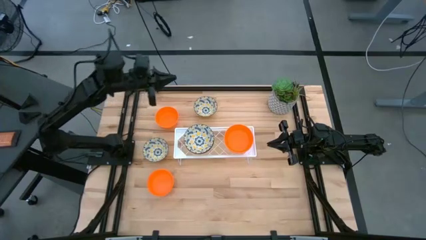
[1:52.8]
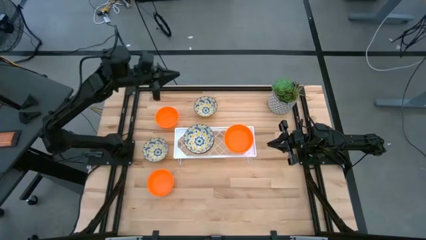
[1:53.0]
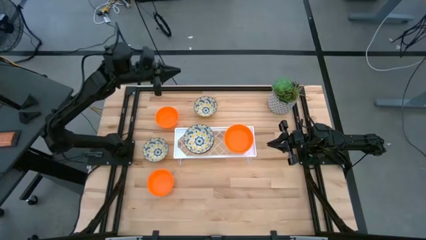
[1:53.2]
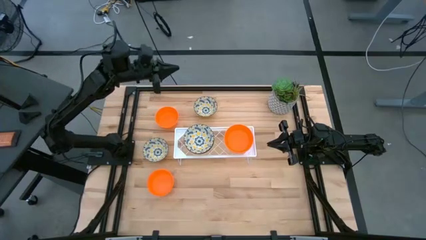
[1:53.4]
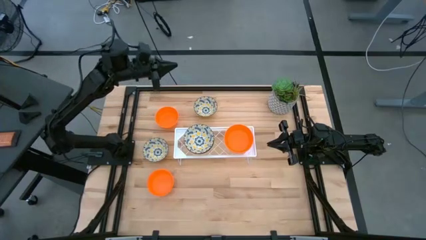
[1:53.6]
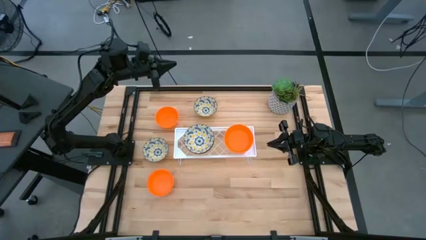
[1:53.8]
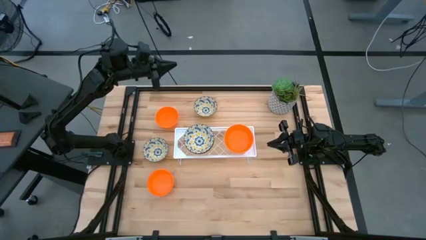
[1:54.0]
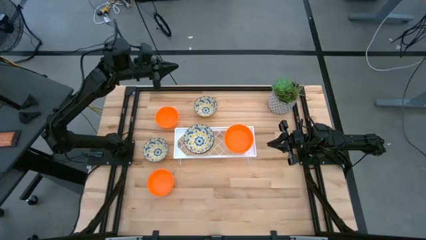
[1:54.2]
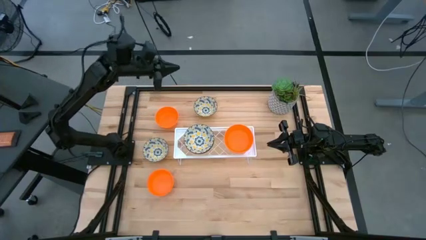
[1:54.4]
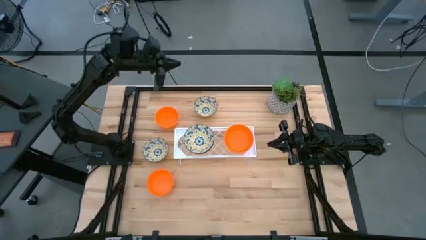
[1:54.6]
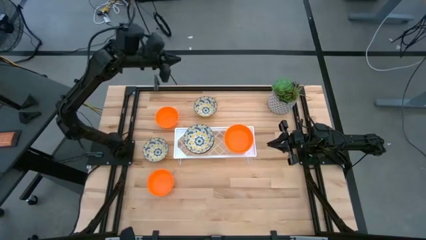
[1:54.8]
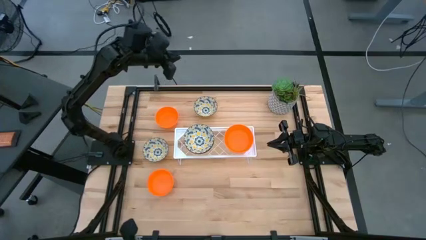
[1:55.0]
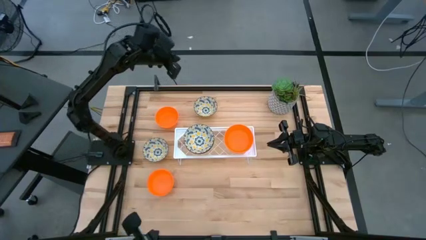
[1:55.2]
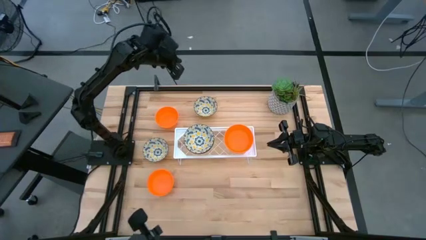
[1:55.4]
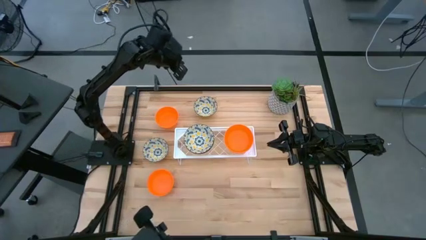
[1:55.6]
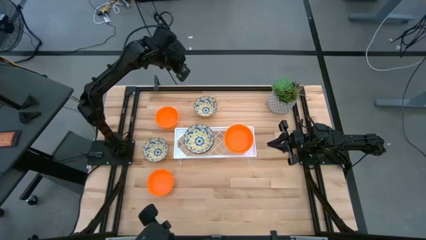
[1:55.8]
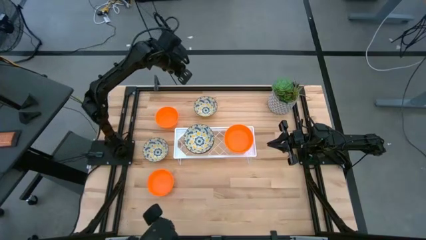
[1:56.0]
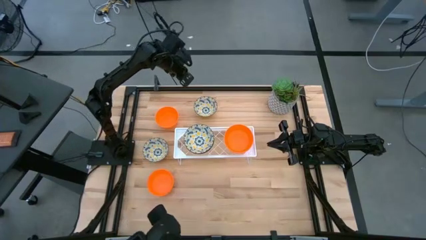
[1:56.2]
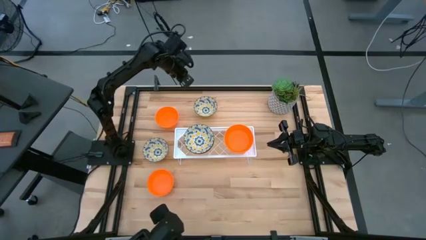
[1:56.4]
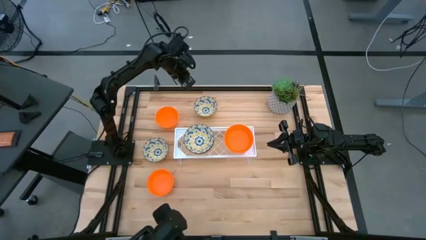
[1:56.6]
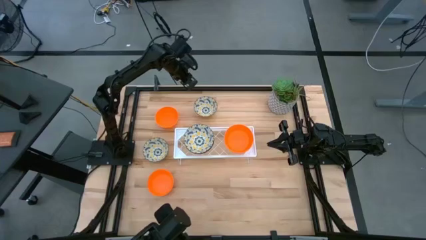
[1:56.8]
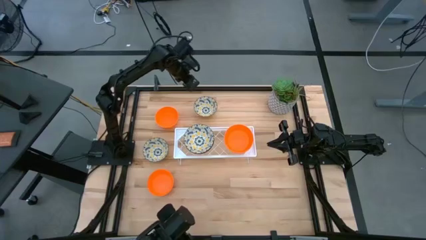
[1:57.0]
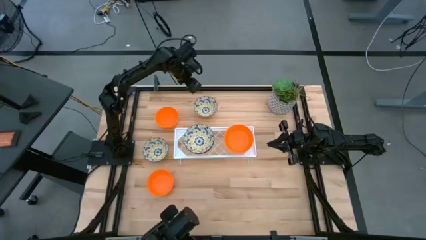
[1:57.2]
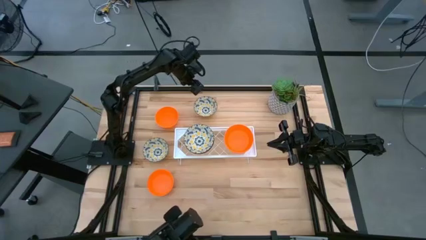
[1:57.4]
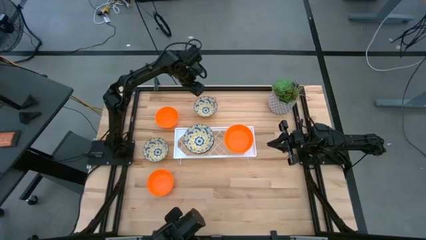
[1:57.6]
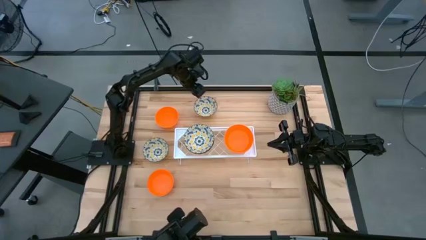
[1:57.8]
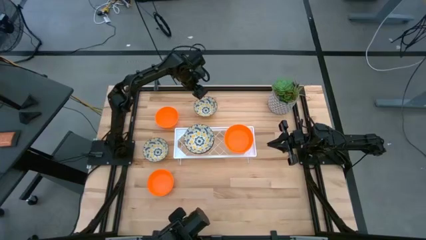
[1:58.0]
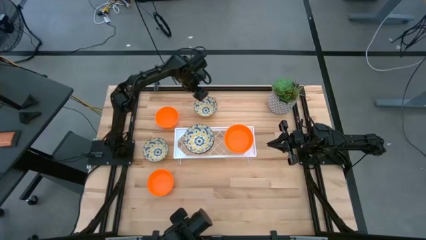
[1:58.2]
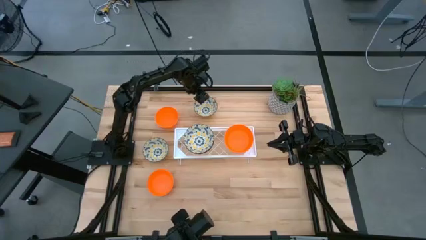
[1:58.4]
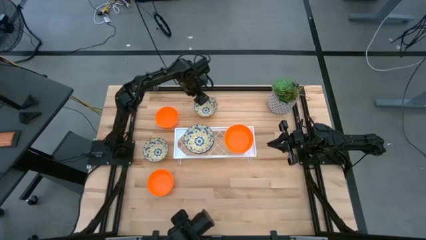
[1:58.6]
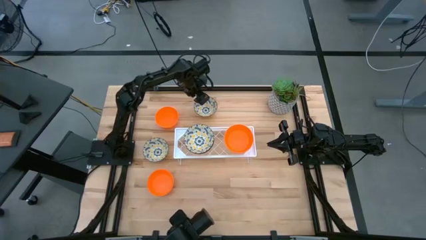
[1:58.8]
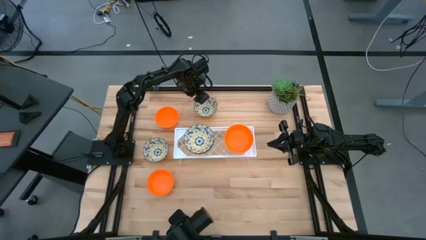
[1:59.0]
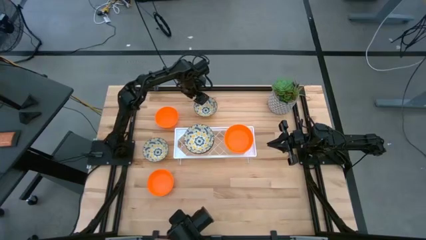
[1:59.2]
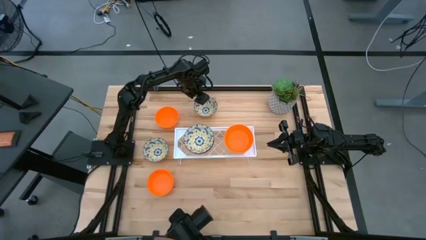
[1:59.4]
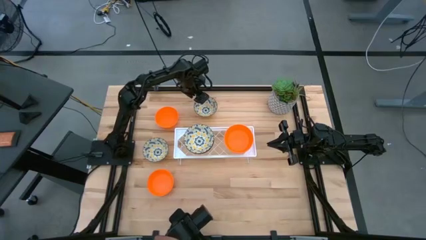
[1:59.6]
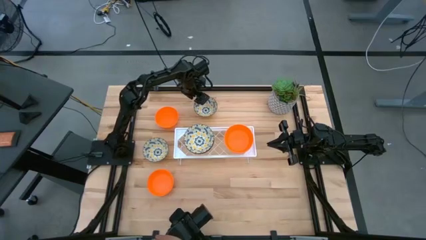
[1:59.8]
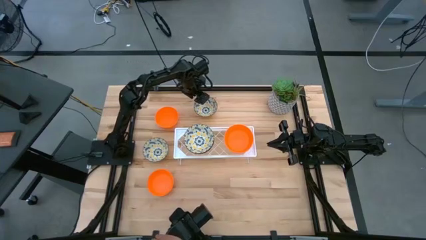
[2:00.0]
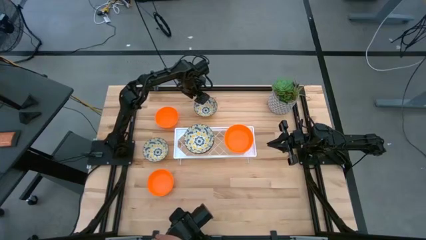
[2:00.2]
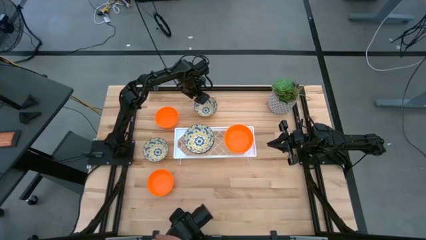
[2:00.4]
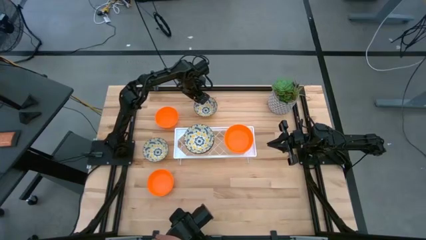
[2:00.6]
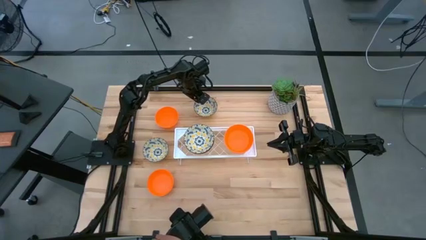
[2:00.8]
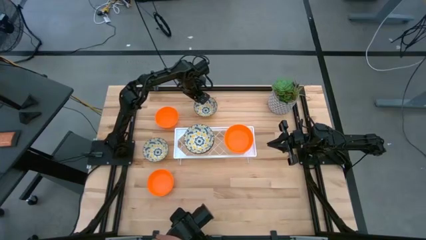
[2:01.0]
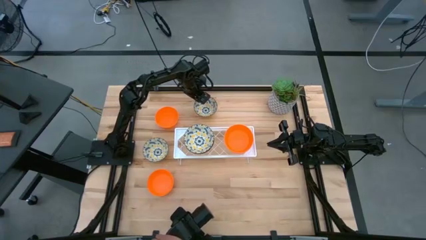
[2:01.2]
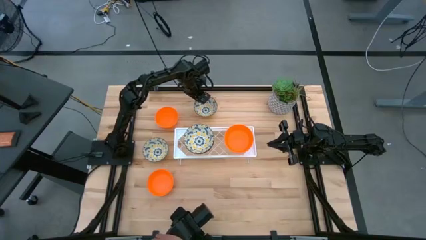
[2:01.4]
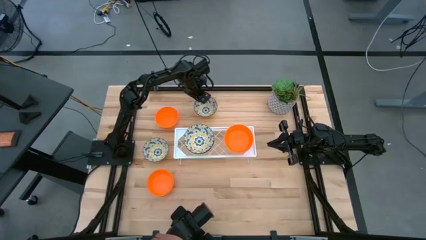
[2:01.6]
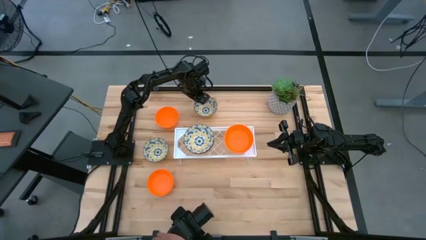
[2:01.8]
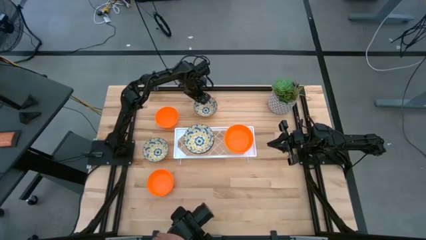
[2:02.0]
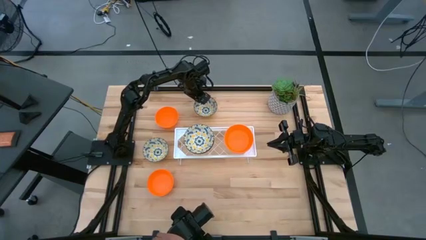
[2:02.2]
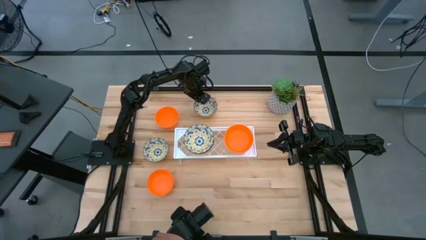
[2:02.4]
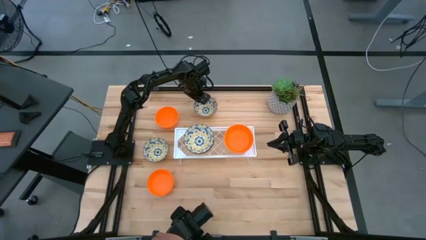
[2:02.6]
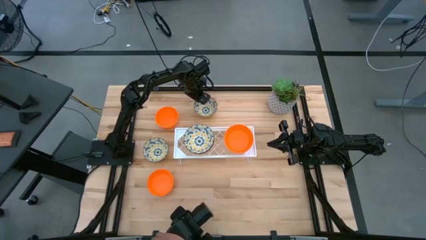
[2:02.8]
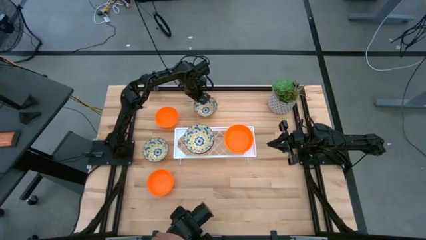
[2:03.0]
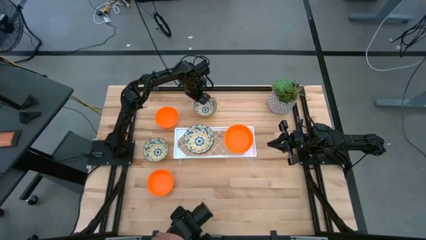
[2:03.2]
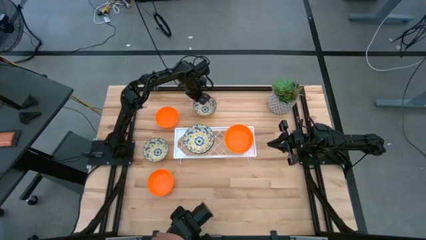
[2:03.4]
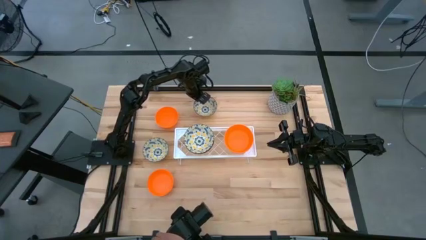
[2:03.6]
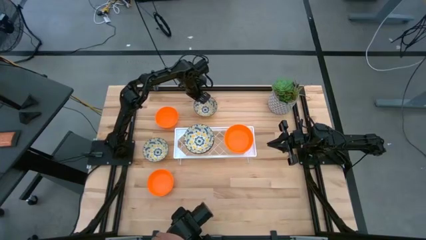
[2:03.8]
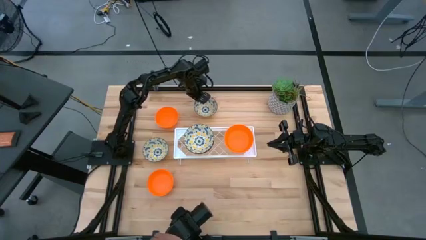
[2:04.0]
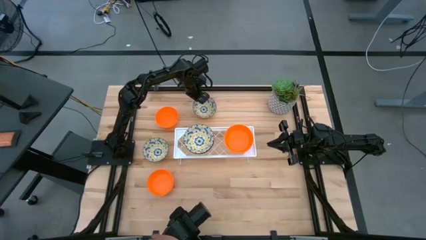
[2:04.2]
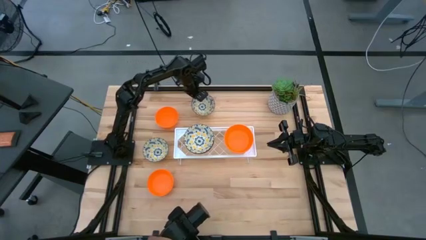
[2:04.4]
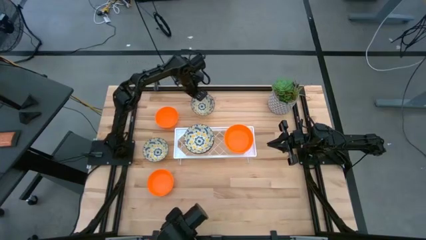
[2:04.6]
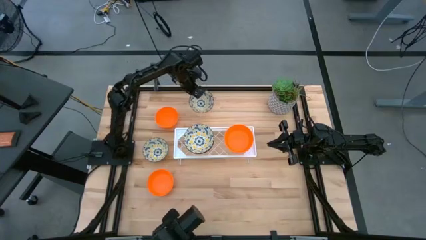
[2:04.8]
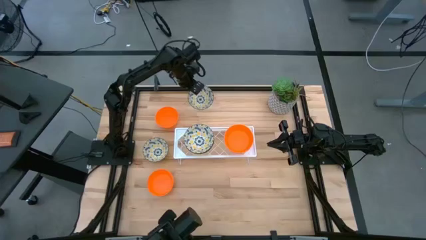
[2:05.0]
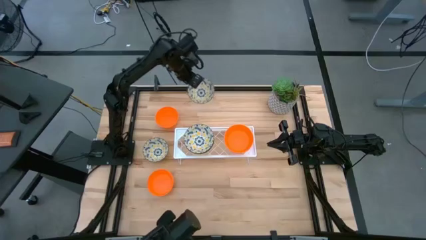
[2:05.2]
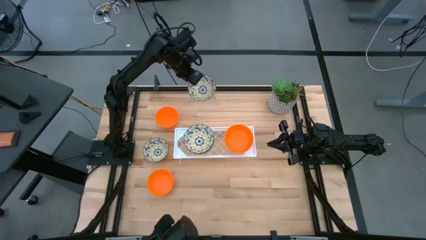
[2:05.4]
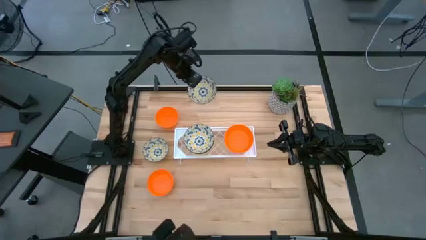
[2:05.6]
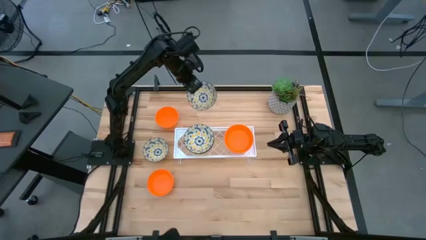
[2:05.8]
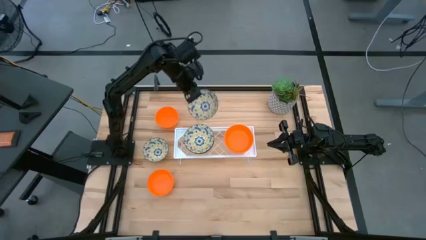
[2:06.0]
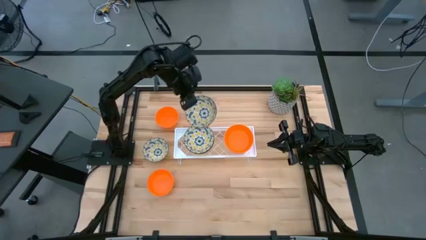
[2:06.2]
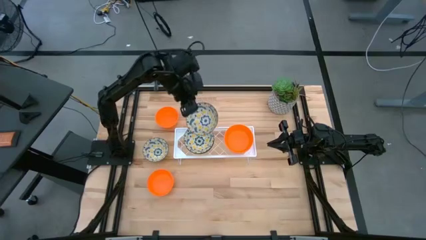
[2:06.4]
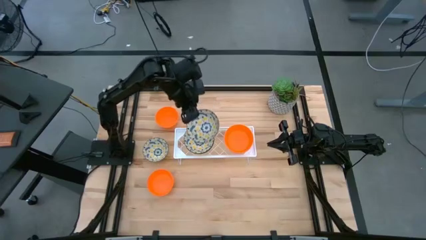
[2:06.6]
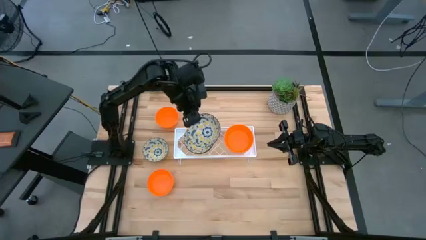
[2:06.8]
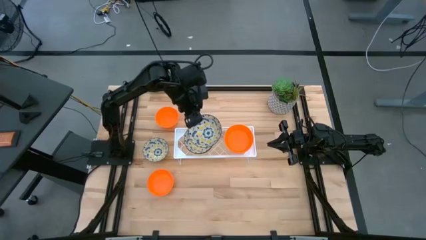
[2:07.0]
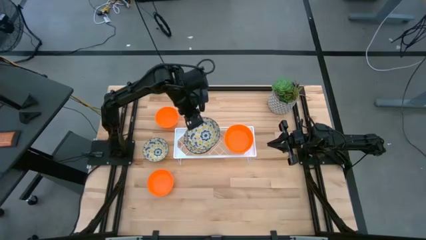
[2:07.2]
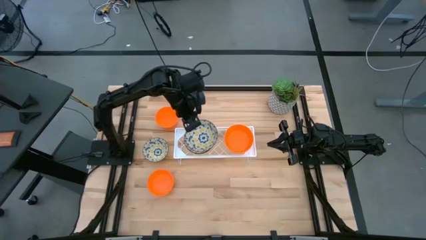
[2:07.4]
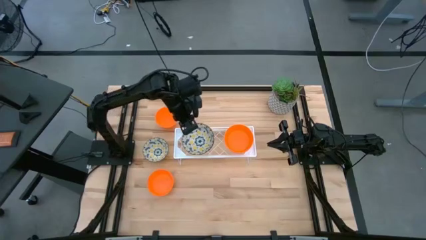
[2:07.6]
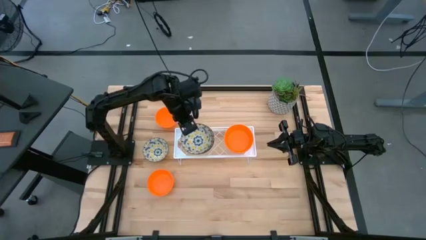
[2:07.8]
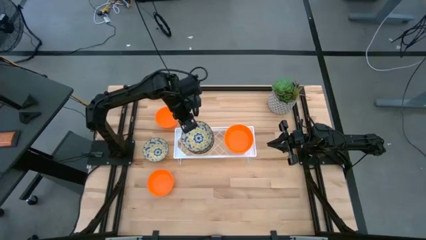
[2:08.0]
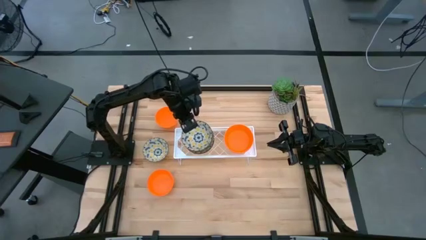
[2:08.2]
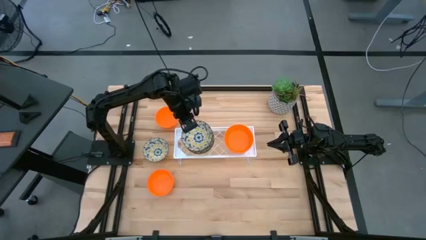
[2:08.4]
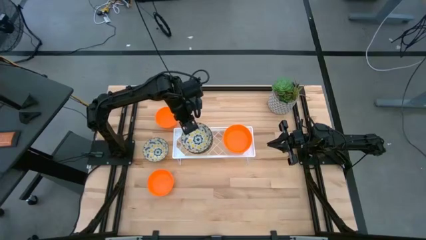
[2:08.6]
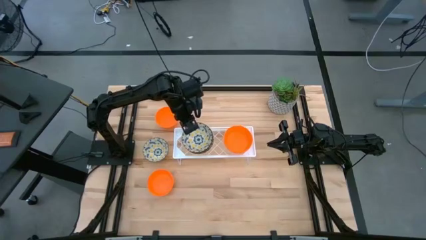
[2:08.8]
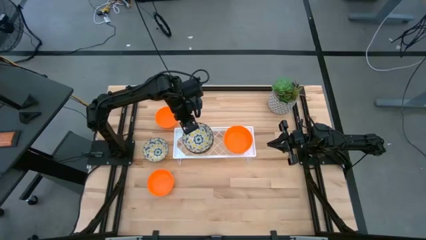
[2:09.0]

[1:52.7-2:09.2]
Task: Pick & Place Mini bowls
Stack the white patterned bowl on the white patterned bowl on the shelf
